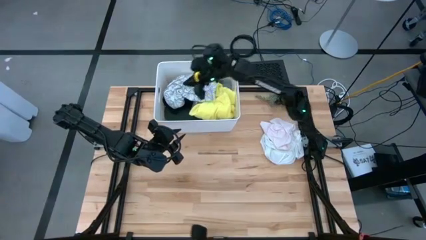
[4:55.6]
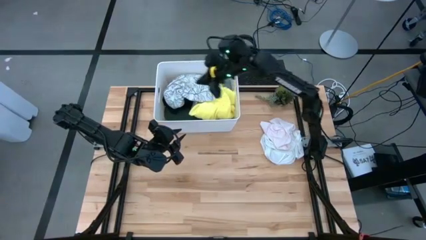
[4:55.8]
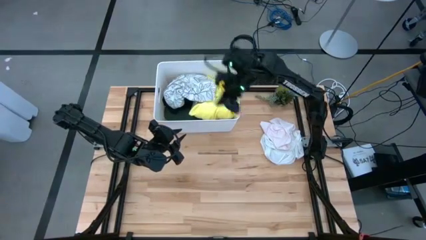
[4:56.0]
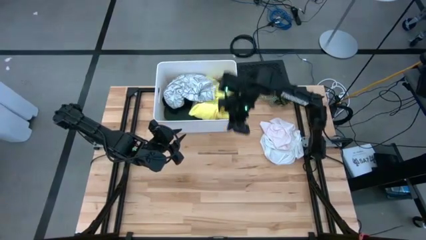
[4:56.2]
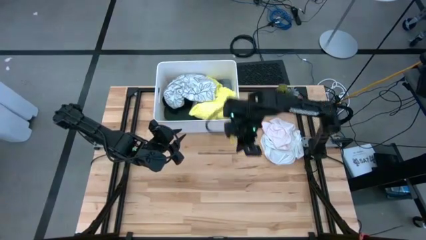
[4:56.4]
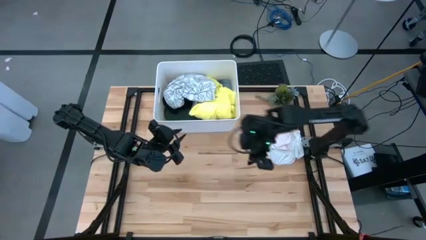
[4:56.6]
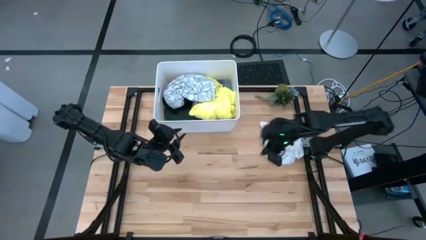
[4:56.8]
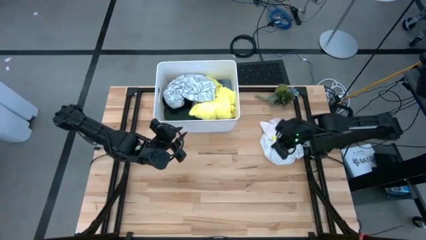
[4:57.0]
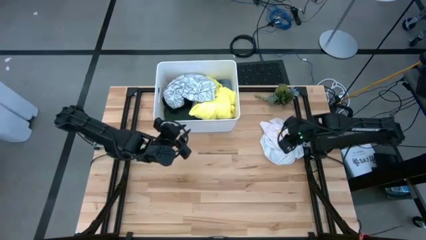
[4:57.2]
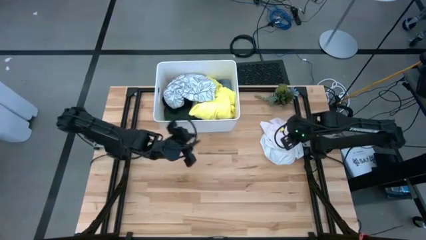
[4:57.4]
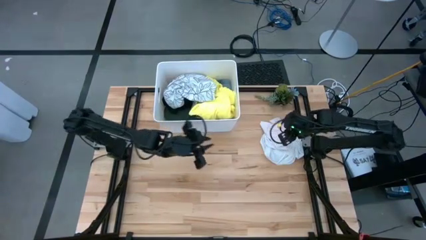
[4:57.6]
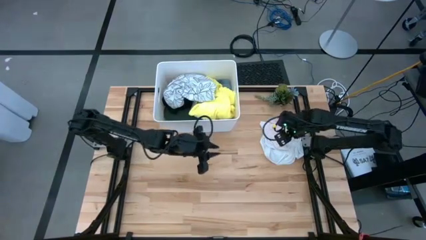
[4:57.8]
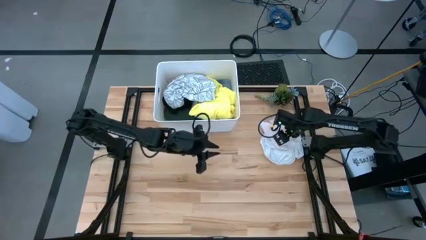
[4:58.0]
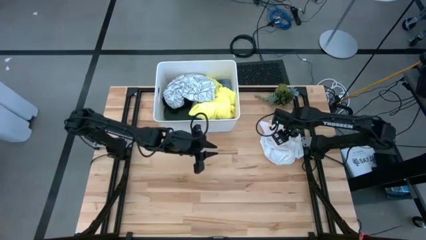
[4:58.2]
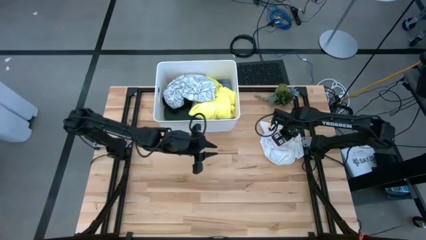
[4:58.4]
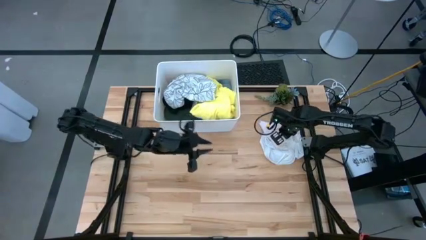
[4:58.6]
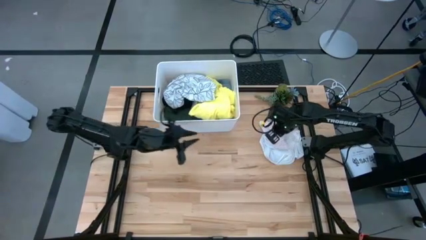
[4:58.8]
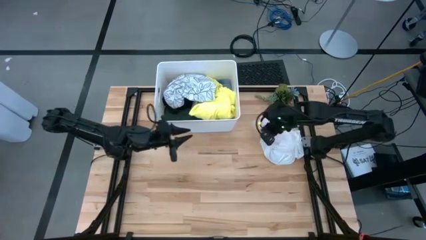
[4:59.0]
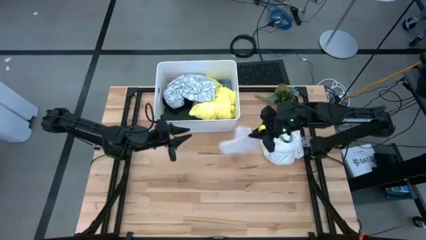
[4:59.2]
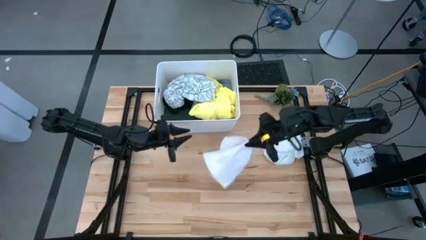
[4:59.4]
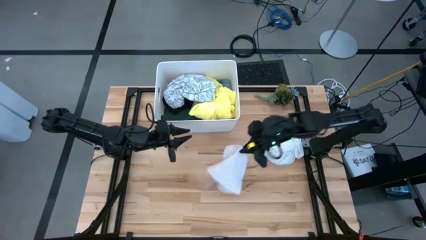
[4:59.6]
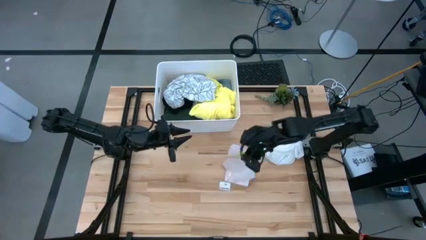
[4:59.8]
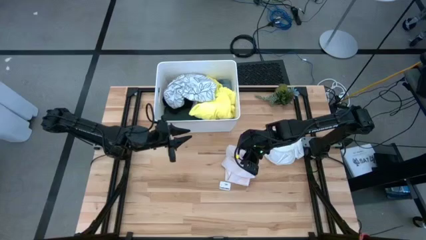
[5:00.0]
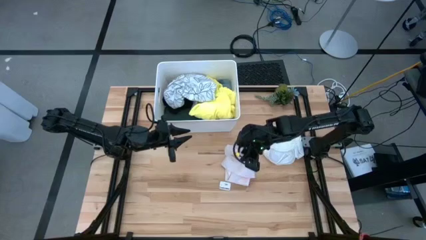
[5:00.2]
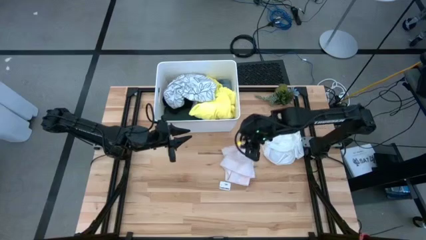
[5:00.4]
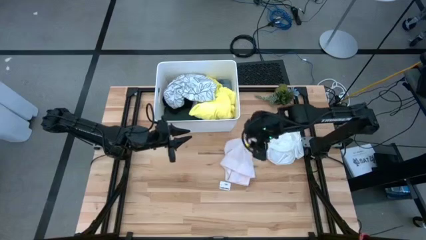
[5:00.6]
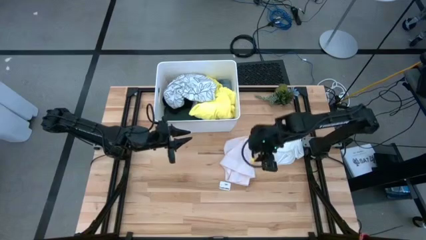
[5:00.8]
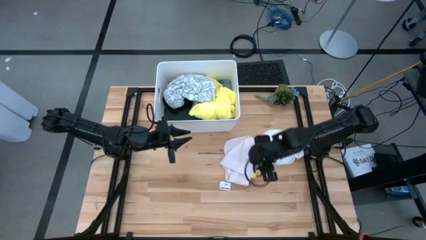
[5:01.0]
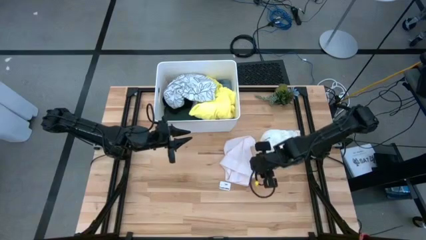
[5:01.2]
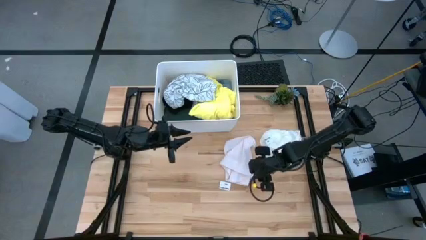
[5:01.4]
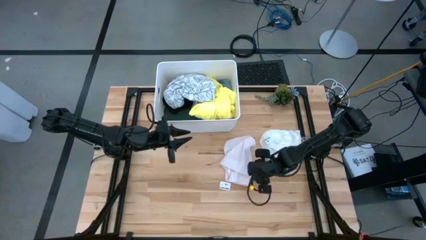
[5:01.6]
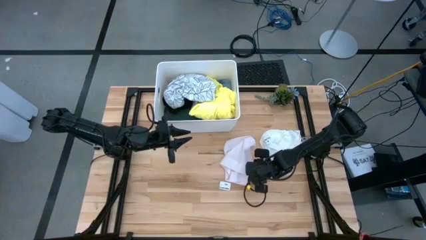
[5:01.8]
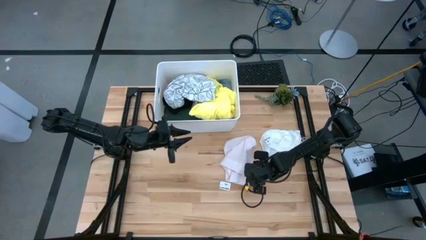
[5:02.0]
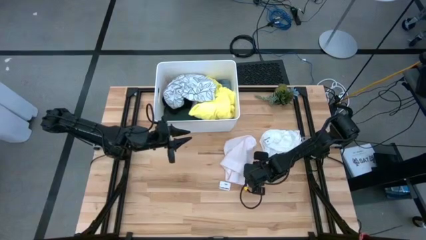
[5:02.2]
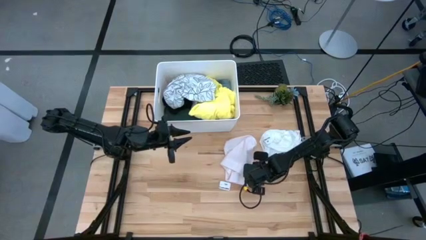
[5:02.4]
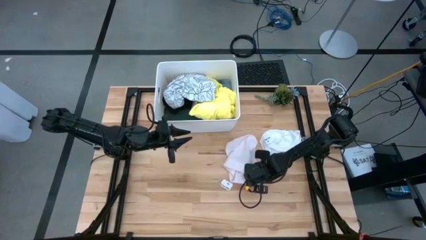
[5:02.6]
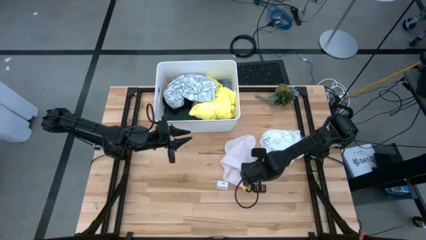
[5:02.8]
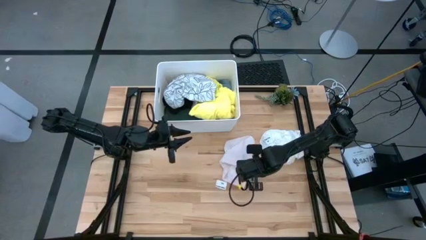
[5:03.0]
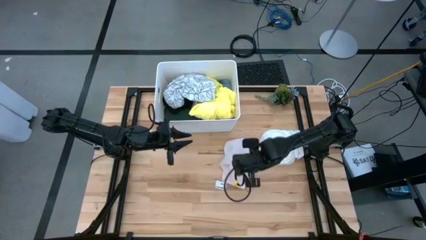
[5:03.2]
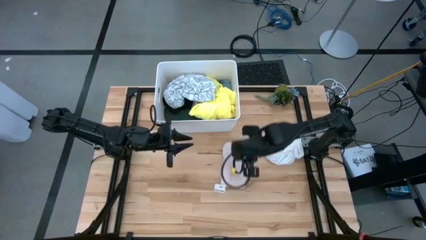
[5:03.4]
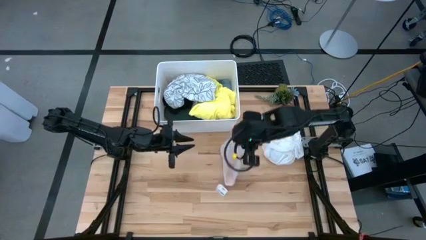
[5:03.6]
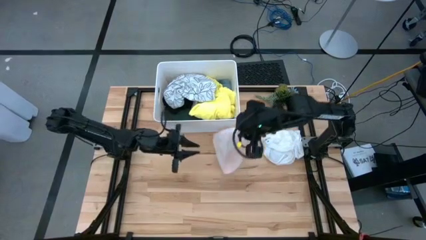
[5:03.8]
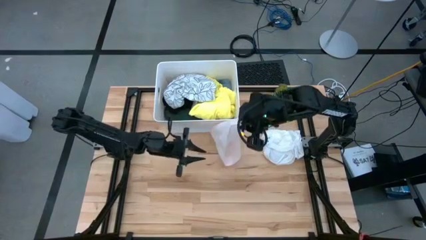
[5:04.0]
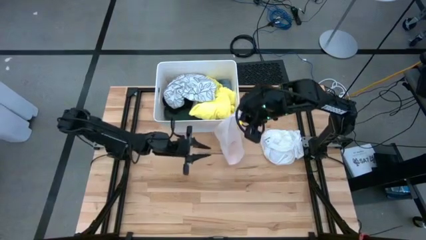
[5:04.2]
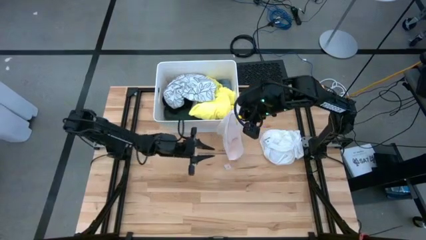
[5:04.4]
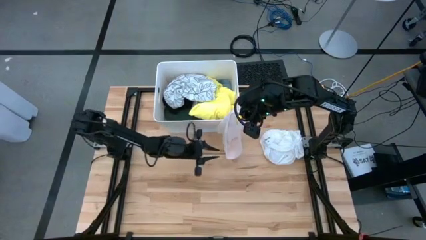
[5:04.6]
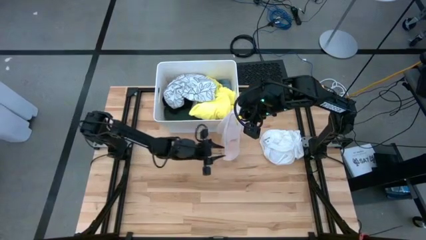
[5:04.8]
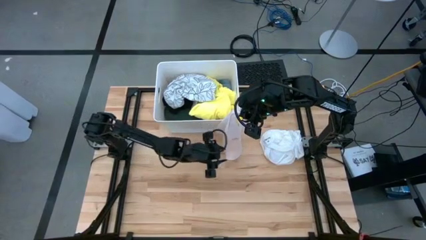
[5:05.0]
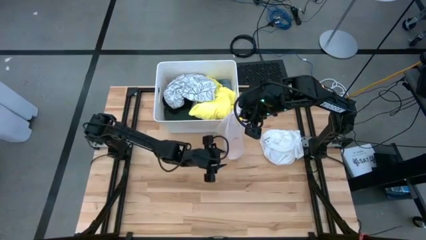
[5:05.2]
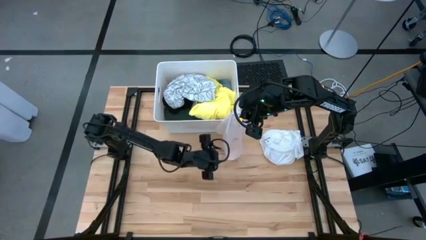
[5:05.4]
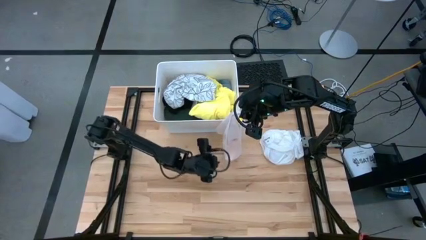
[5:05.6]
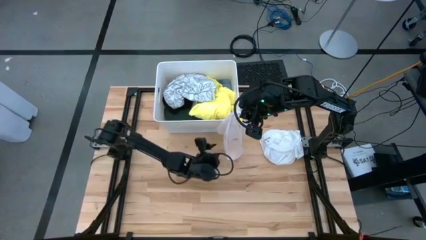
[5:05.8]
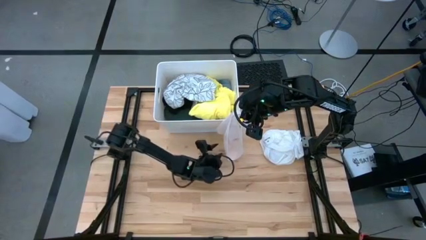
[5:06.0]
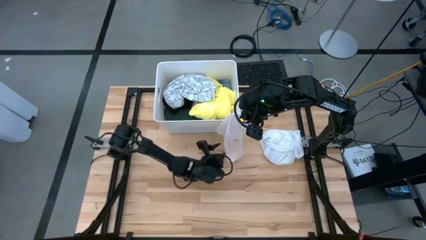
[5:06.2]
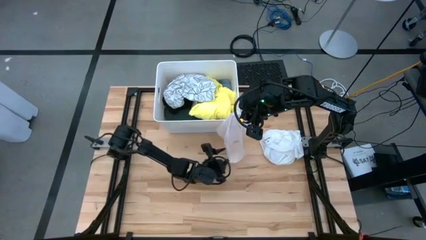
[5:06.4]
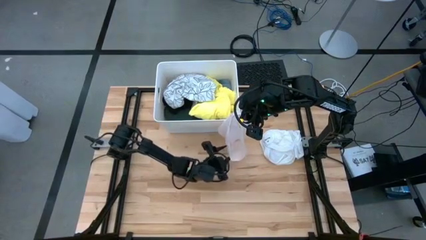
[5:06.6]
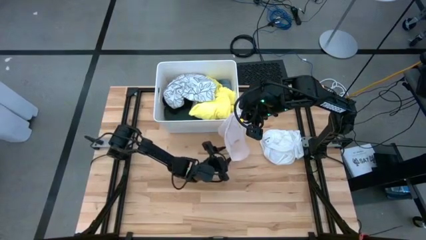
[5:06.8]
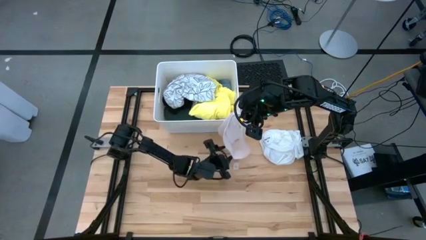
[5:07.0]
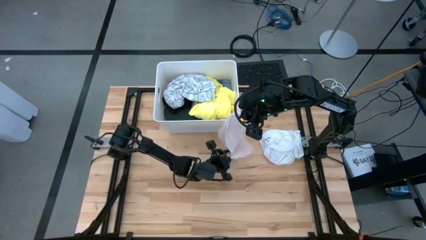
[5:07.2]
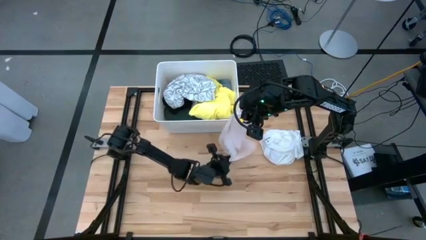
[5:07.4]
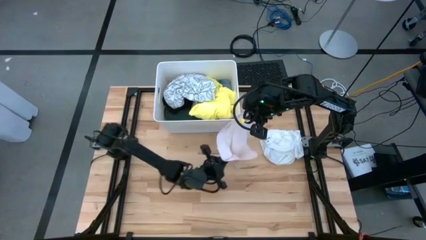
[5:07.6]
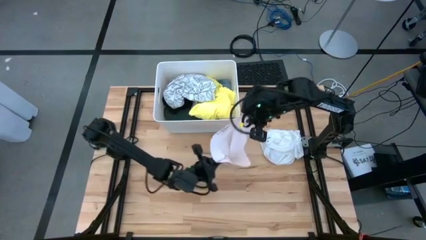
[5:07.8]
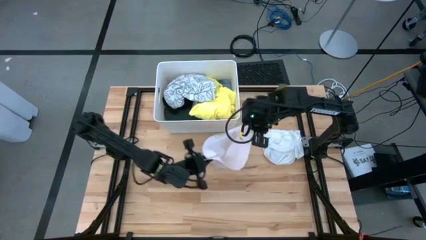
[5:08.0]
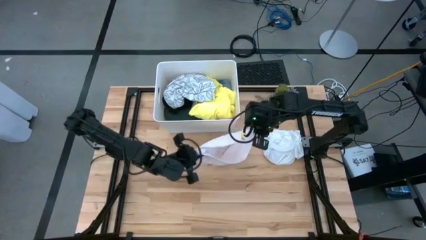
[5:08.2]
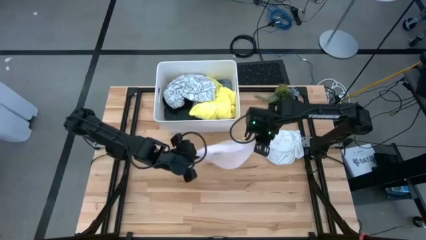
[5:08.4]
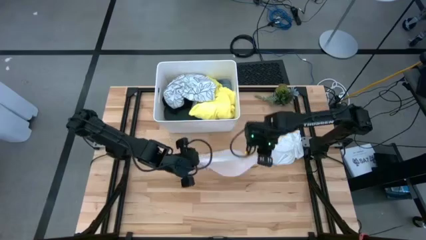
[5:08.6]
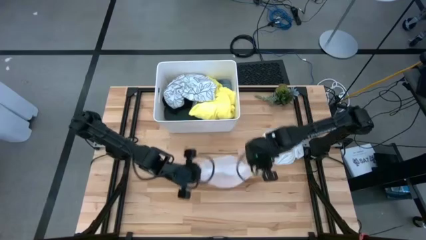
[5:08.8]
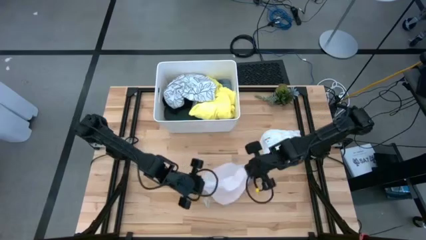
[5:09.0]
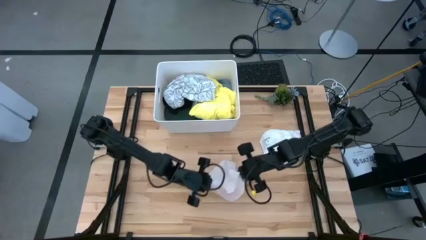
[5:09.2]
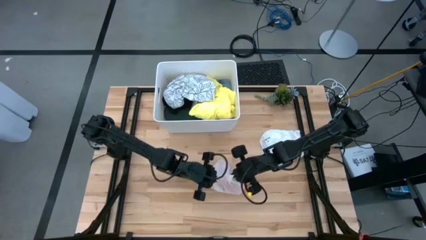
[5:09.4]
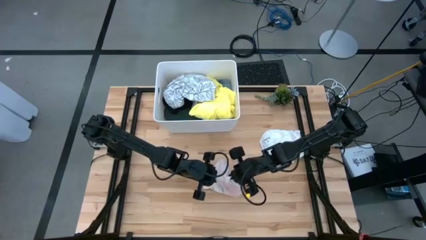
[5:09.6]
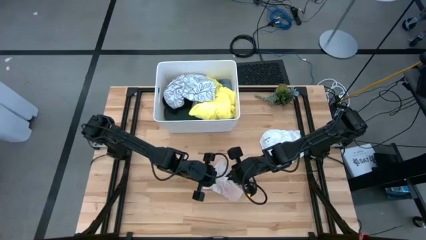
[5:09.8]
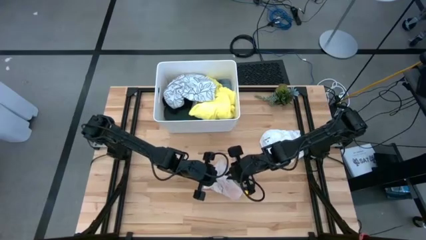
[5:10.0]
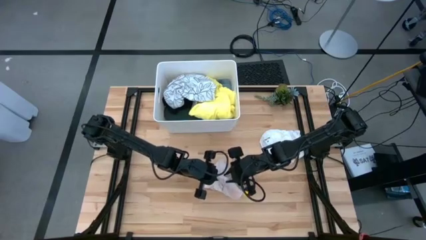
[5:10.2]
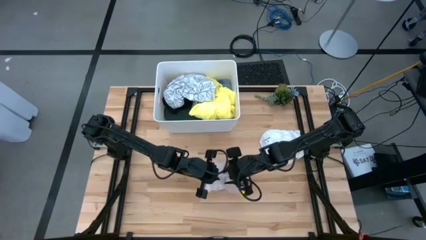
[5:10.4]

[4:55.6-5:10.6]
Task: Fold laundry
Fold the pink underwear

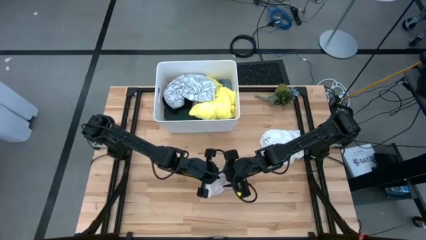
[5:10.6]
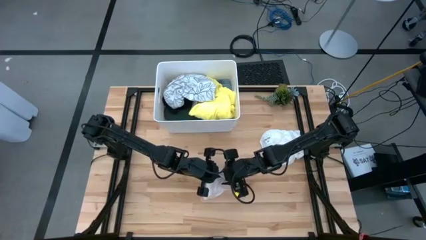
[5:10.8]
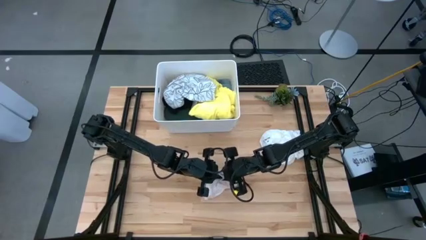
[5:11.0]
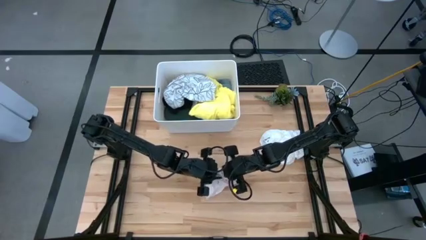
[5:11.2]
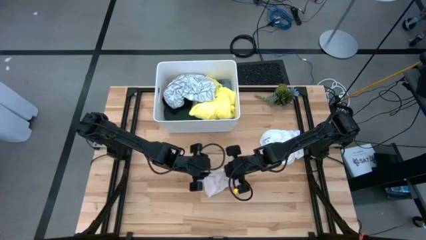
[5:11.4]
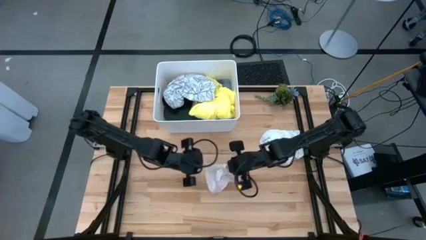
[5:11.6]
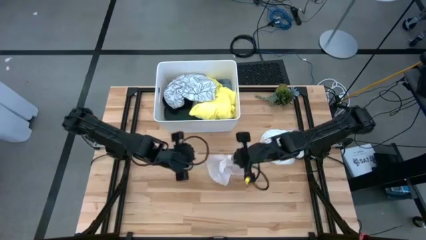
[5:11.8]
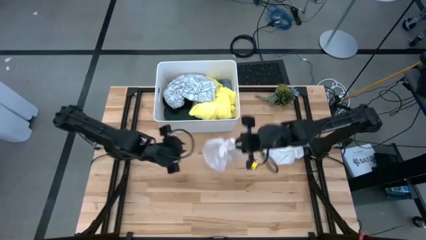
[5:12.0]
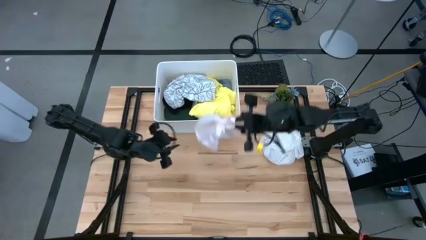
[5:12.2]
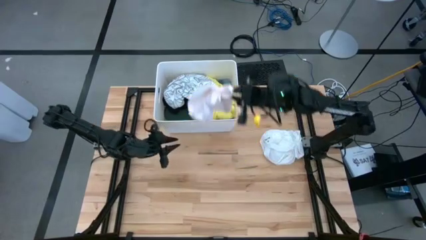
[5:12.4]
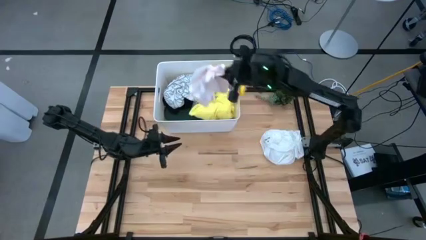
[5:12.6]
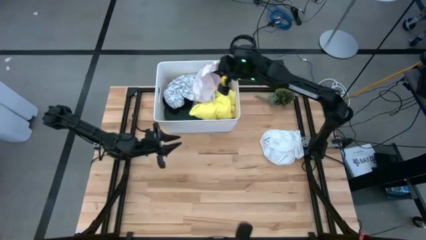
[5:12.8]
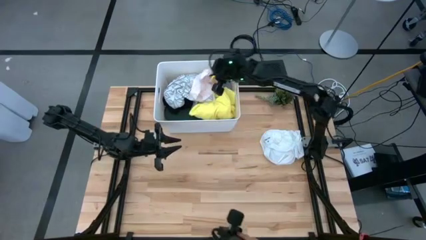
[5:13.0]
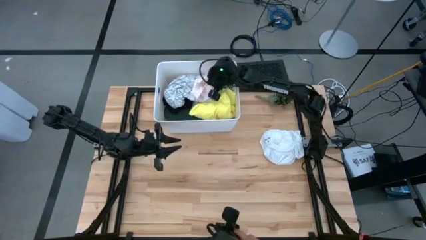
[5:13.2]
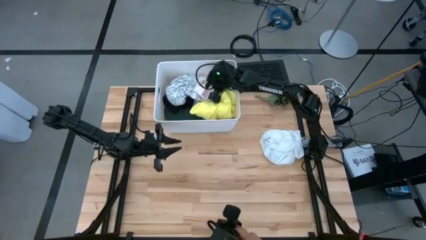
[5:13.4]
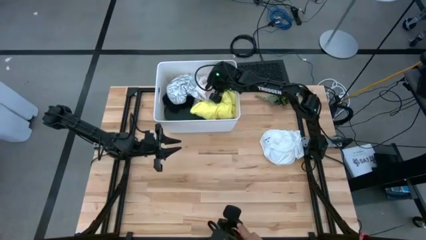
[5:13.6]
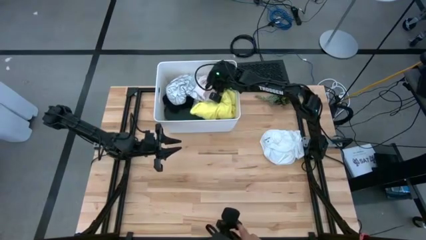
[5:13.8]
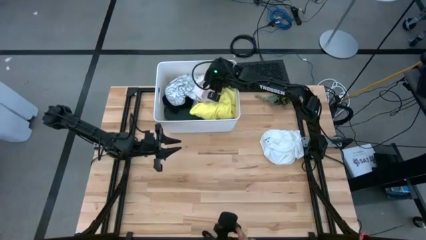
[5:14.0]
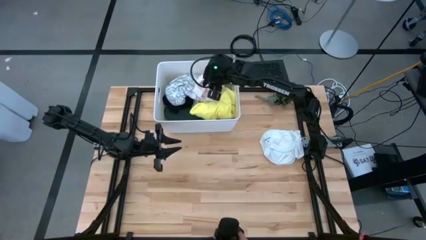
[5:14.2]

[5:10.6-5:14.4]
Put the folded pink underwear into the white laundry bin
